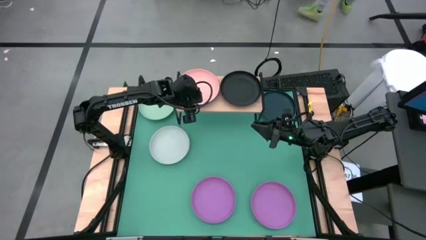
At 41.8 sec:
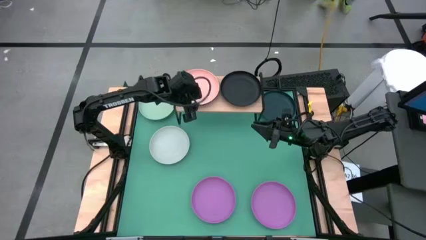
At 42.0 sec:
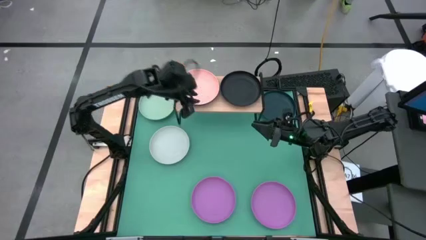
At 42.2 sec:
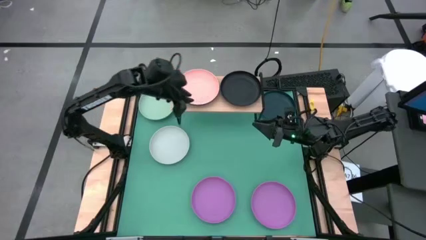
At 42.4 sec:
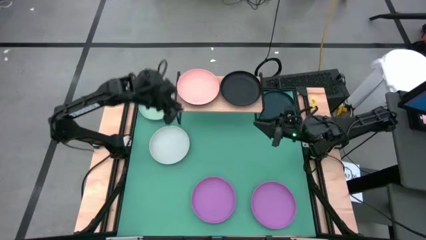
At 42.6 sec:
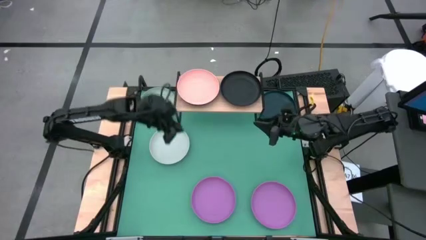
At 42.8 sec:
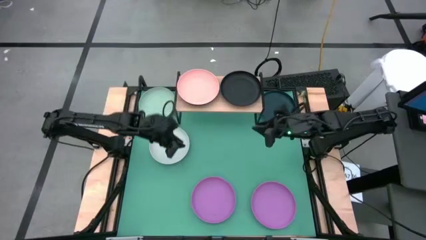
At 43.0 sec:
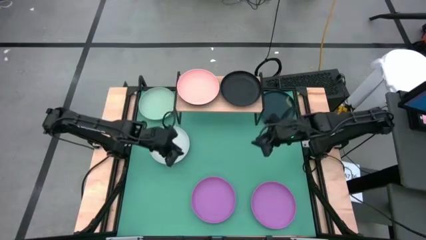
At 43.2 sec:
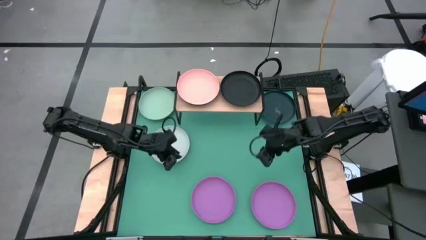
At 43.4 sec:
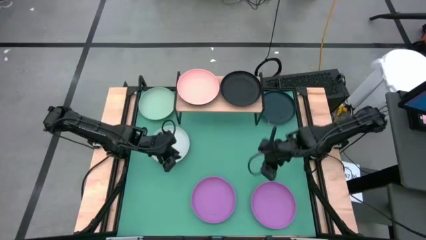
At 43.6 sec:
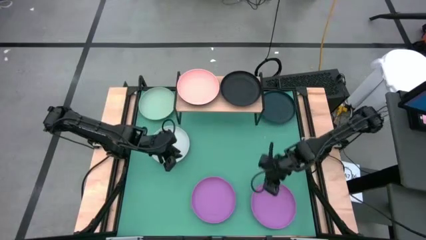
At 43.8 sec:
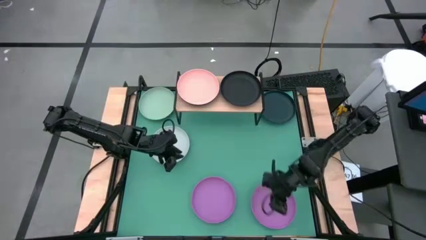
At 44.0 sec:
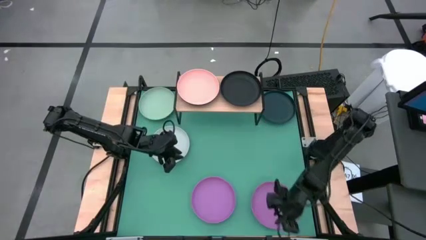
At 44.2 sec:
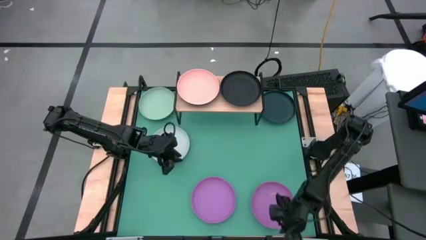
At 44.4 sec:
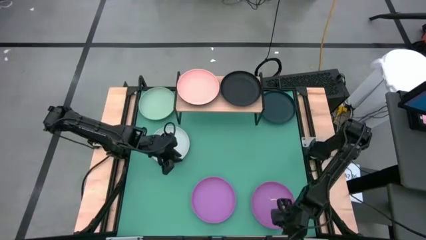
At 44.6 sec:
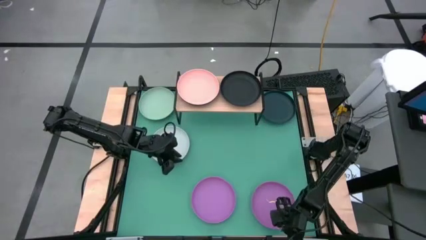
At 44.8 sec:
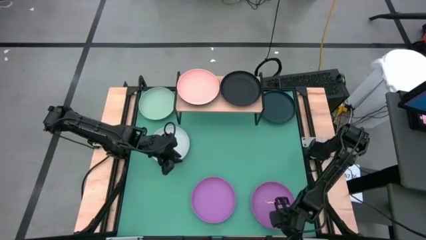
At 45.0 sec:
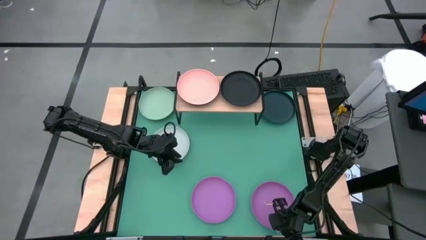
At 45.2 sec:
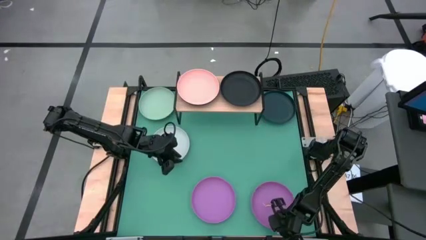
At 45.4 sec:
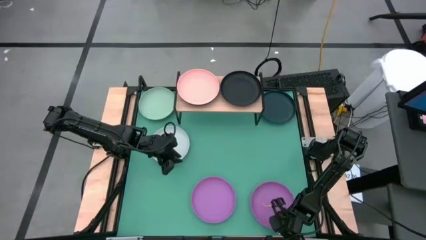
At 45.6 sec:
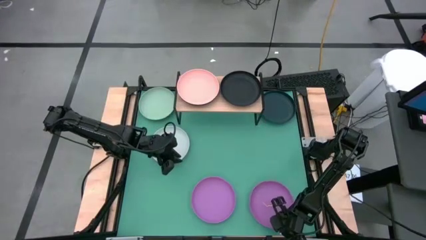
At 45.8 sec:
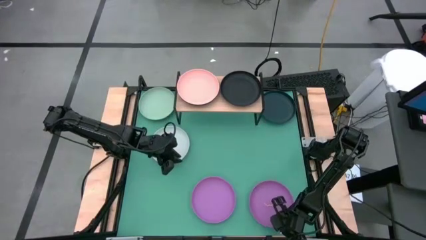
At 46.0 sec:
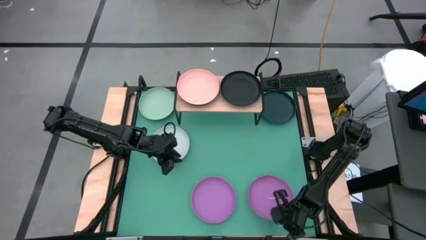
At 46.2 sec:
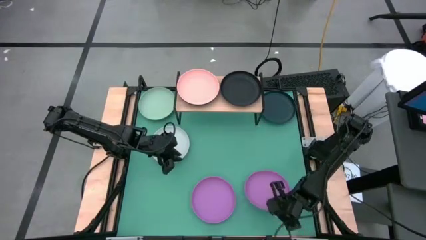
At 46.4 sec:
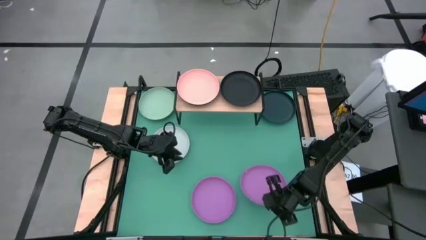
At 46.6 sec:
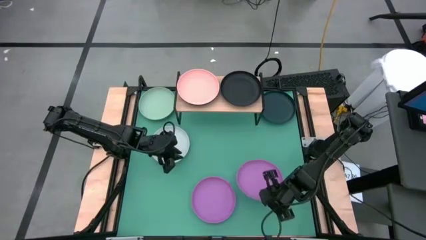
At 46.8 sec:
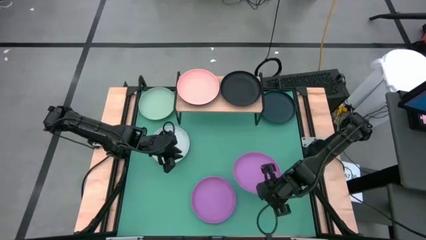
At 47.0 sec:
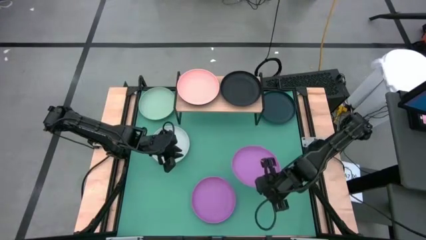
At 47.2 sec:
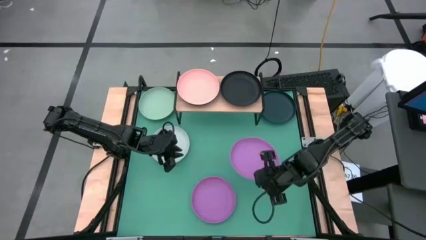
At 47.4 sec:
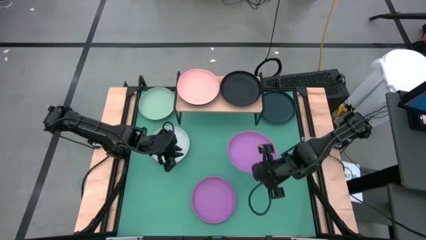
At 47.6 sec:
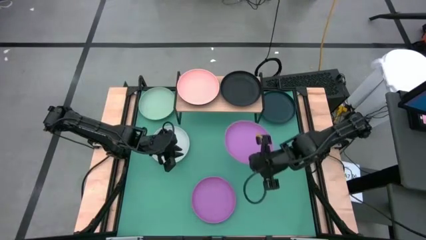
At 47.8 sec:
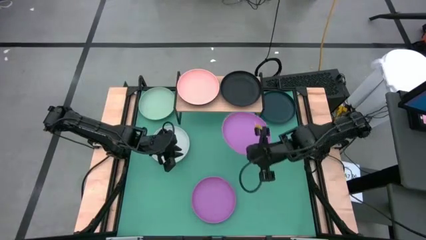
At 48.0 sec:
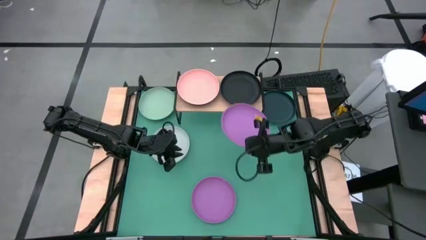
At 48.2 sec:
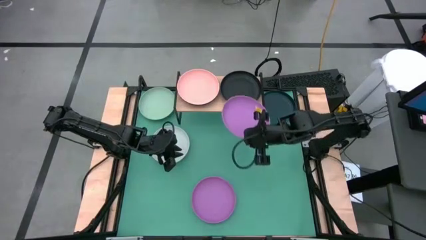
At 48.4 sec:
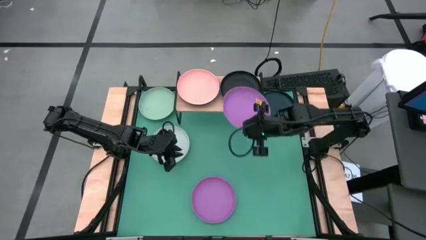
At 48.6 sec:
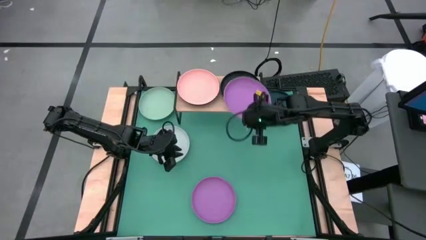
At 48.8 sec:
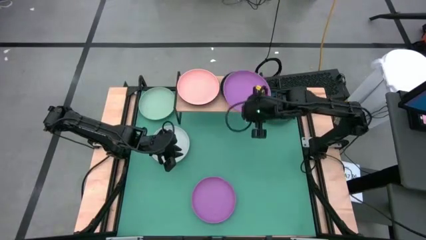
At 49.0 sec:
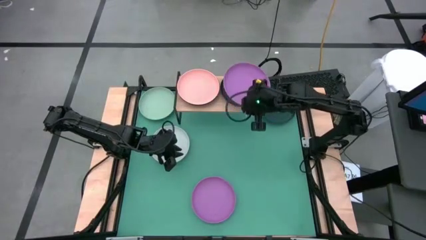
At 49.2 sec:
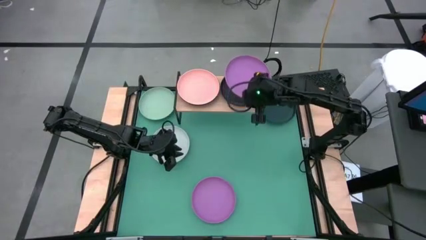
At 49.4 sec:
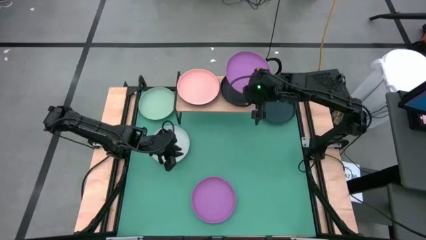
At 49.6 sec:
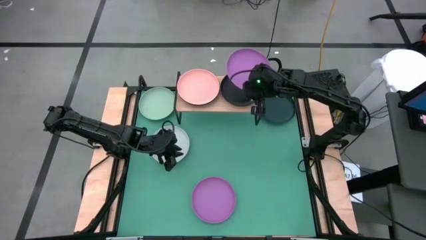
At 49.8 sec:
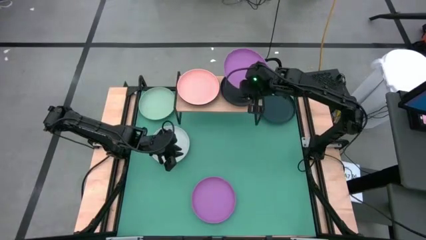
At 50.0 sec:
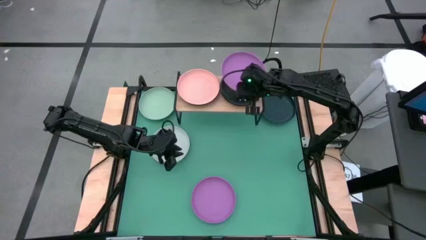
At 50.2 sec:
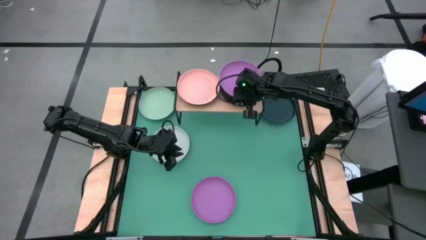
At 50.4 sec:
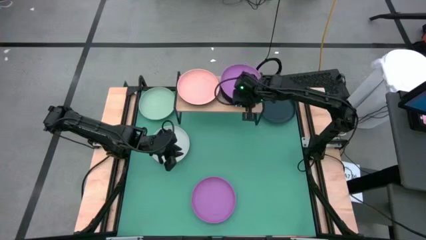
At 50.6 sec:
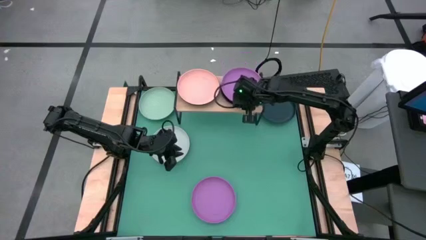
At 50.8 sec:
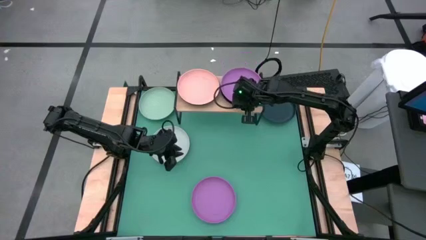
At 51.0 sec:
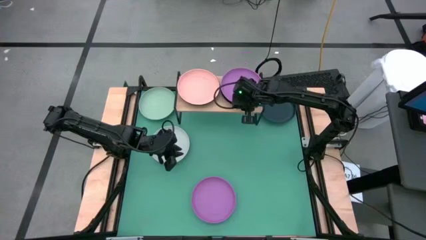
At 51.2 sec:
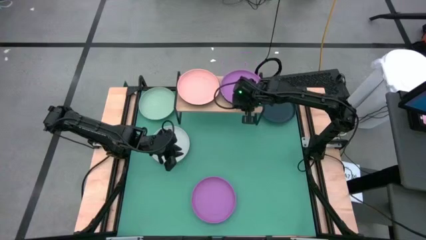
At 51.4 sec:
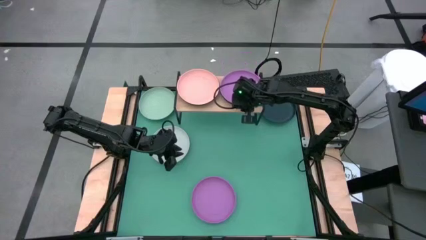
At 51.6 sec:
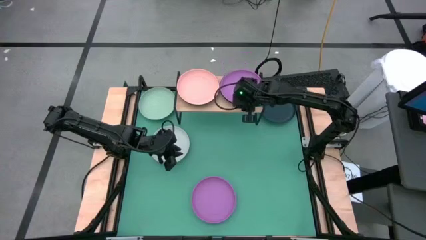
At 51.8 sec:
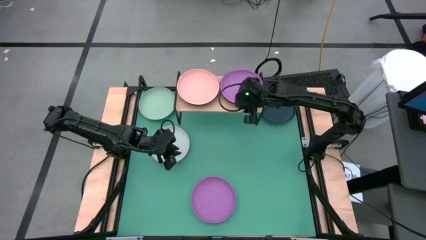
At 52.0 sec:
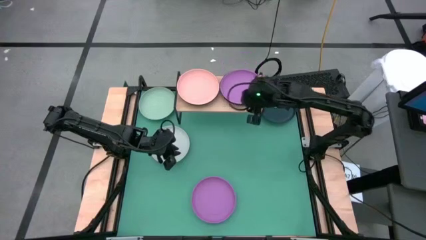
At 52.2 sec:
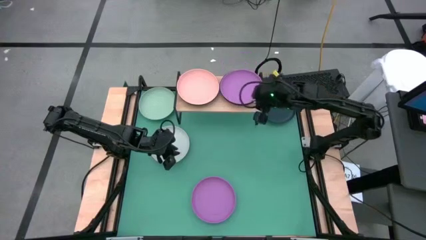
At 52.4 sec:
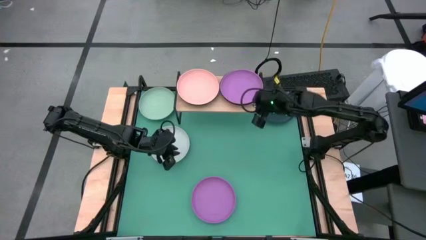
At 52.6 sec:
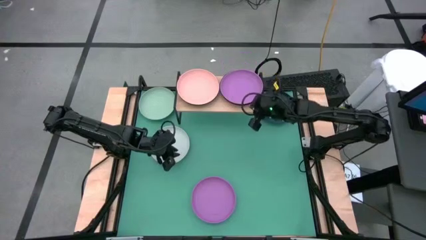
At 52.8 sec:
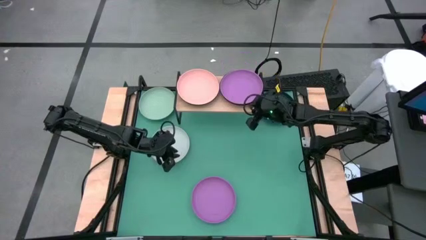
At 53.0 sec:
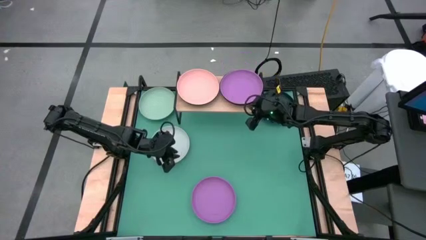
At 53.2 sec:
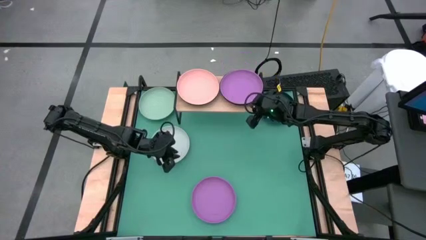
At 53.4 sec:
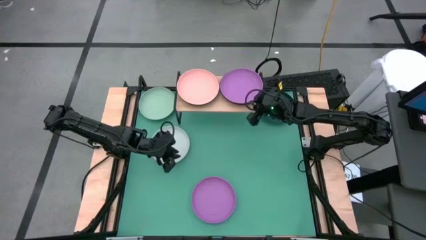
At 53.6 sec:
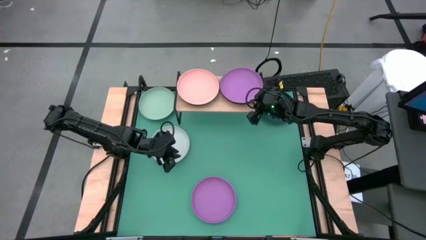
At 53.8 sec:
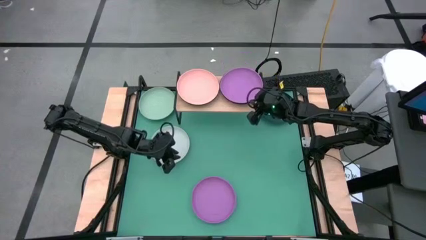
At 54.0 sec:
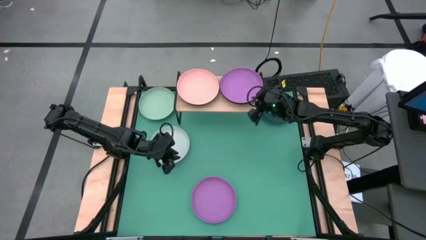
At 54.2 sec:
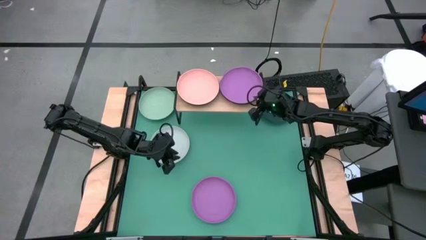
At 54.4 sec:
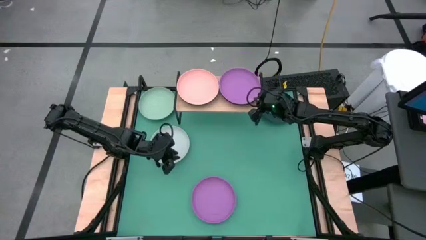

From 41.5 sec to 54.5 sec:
Task: Place and stack plates onto a shelf
Stack the right purple plate on top of the black plate on the shelf

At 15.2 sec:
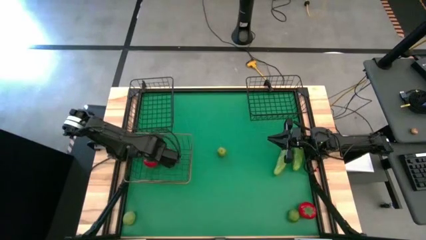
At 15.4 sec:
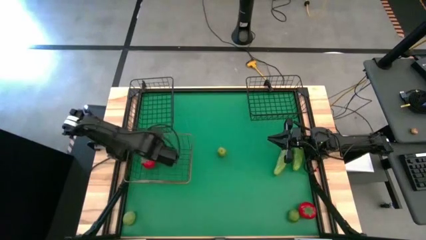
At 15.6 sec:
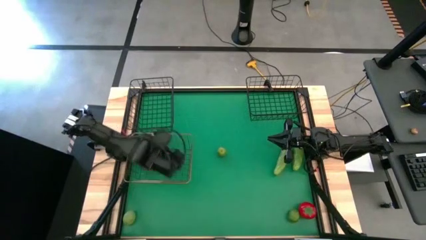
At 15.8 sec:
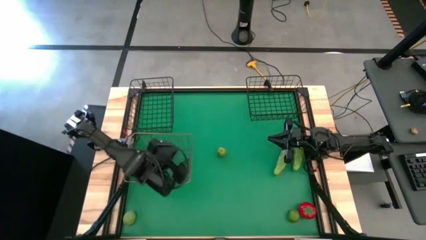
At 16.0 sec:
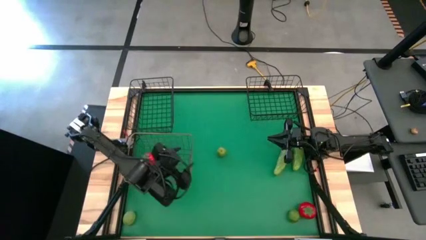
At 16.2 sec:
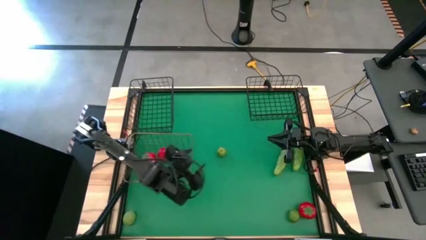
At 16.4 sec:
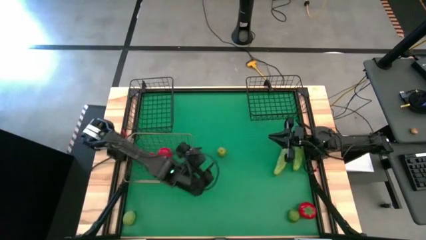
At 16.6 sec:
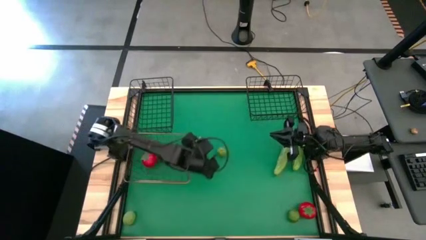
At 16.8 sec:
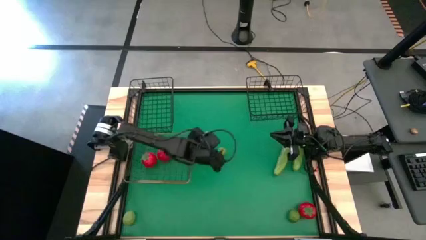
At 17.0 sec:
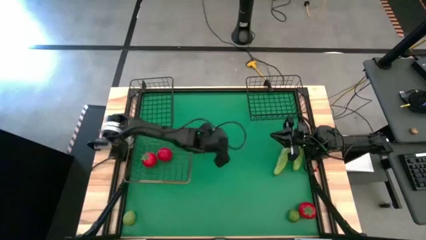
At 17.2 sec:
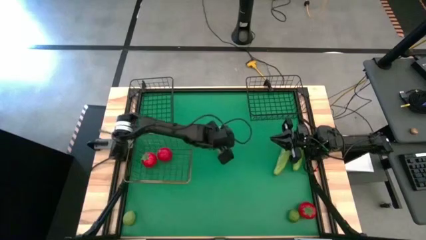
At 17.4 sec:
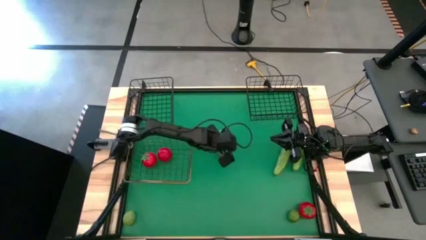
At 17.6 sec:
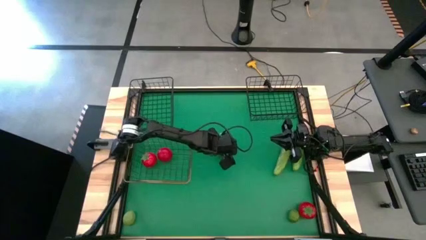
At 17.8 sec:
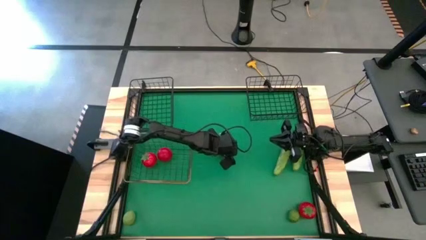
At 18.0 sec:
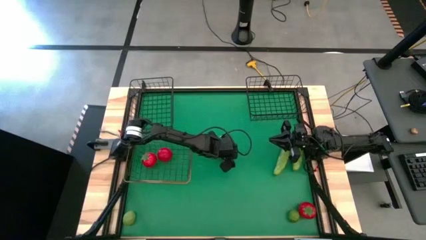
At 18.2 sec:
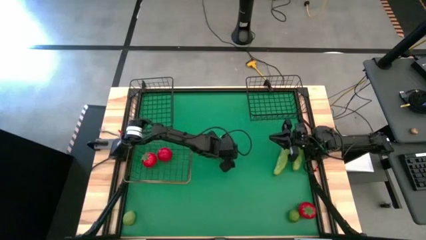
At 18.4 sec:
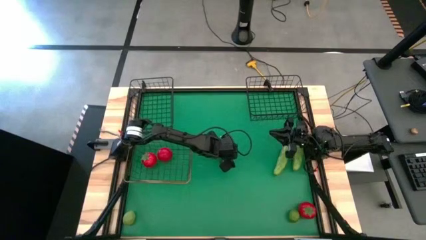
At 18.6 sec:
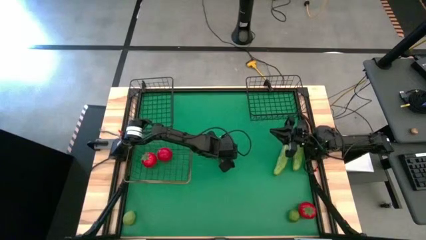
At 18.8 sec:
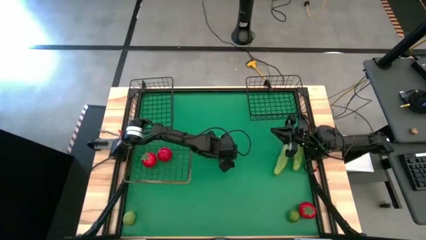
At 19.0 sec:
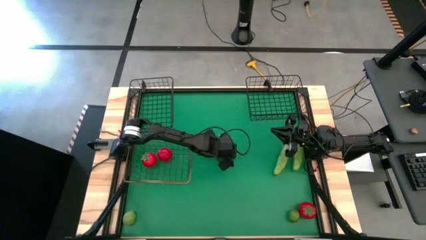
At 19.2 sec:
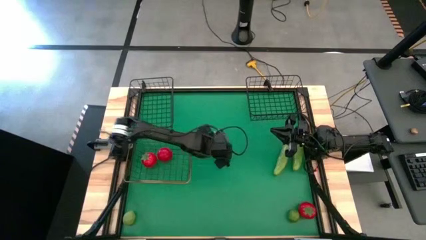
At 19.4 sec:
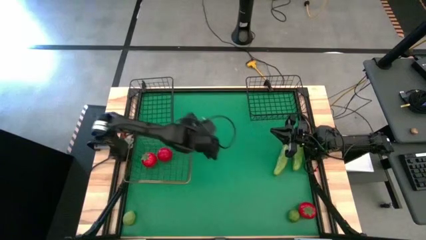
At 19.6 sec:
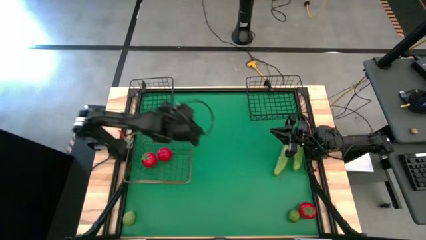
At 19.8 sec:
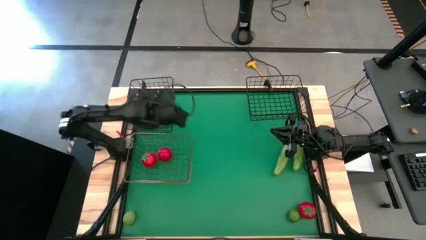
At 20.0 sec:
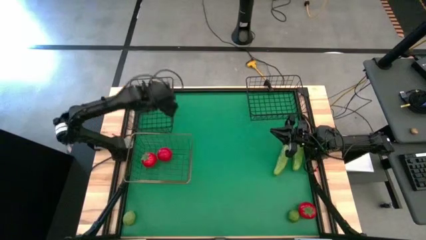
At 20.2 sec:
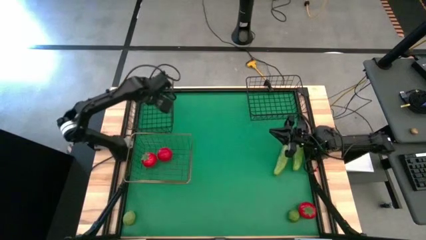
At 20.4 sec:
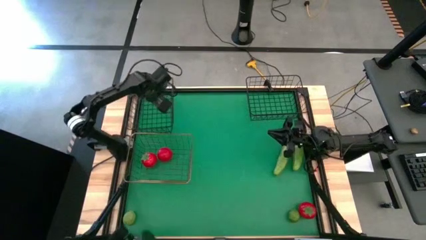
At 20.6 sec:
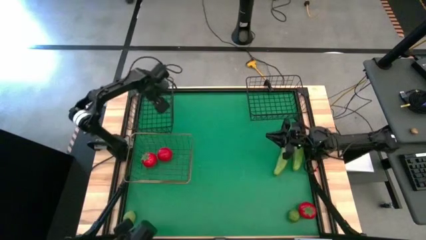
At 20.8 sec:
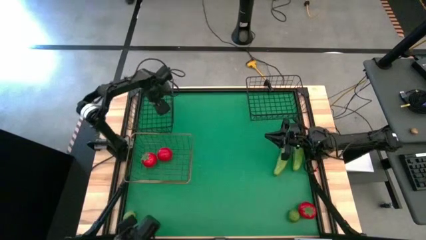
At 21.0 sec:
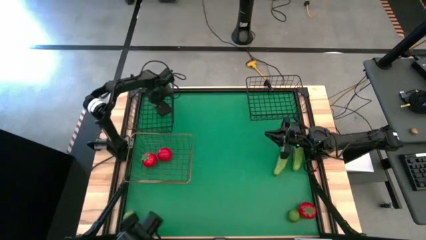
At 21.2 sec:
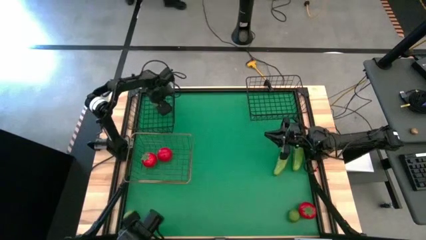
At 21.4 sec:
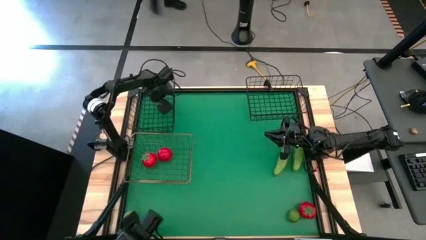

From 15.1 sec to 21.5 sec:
Task: Sort produce into baskets
Put the top lime into the left black wire basket
